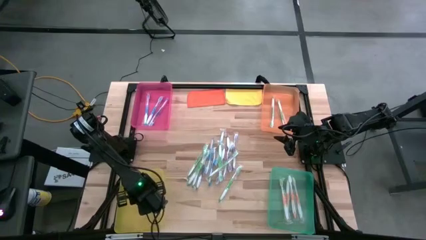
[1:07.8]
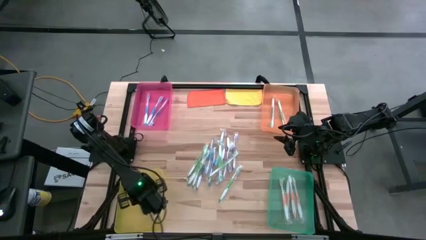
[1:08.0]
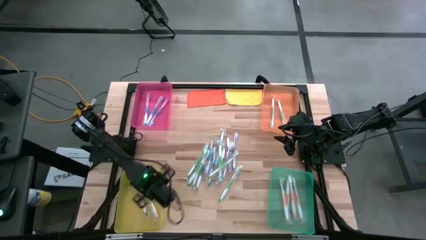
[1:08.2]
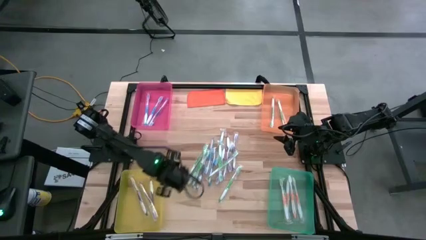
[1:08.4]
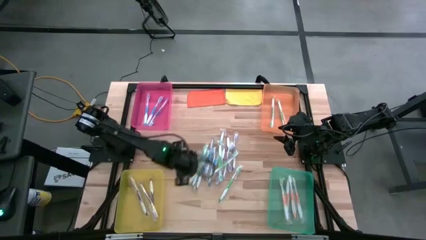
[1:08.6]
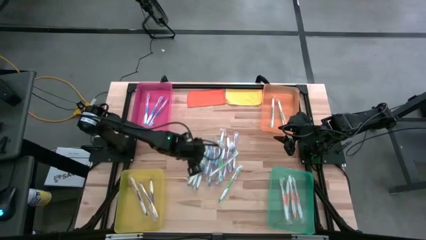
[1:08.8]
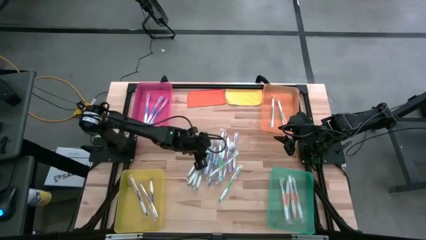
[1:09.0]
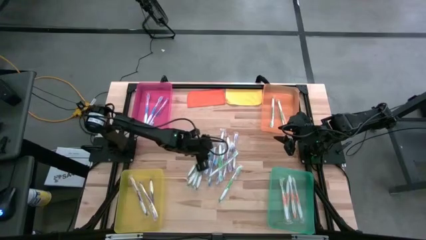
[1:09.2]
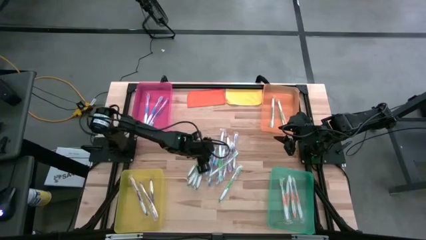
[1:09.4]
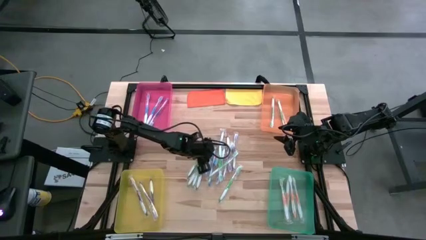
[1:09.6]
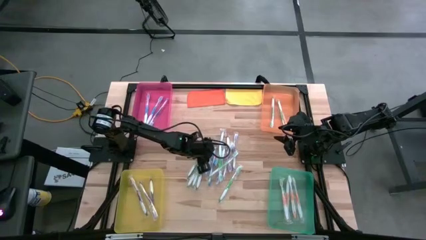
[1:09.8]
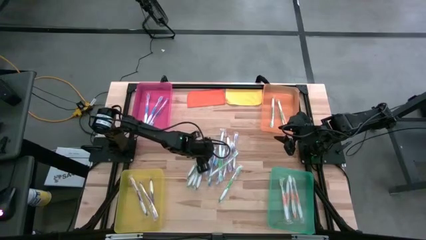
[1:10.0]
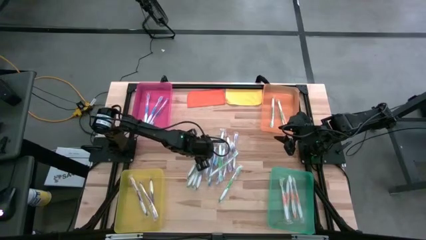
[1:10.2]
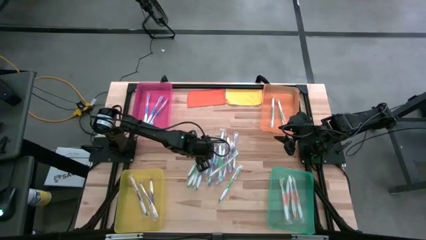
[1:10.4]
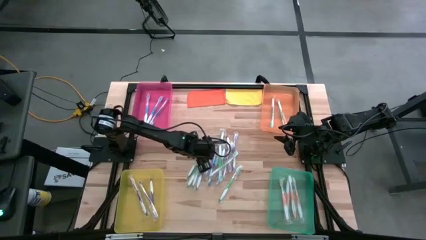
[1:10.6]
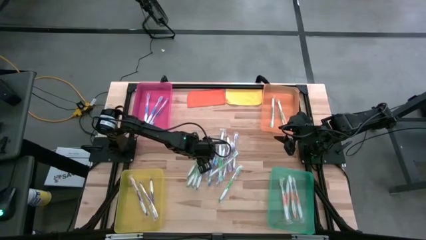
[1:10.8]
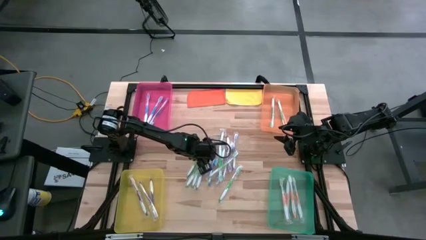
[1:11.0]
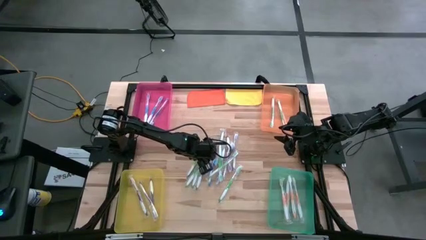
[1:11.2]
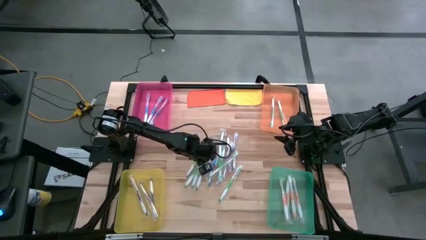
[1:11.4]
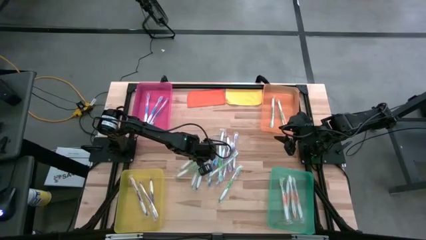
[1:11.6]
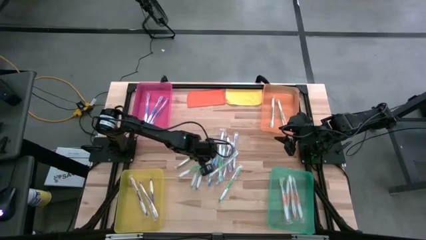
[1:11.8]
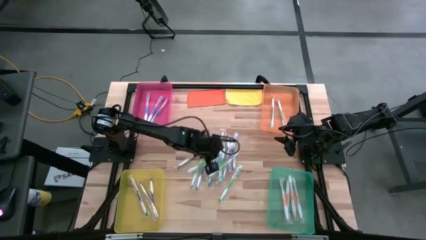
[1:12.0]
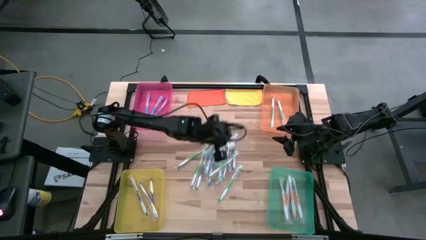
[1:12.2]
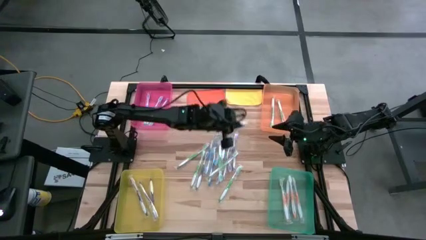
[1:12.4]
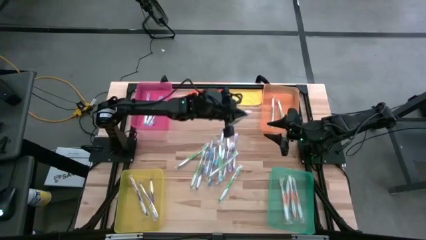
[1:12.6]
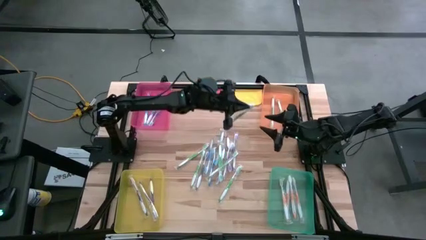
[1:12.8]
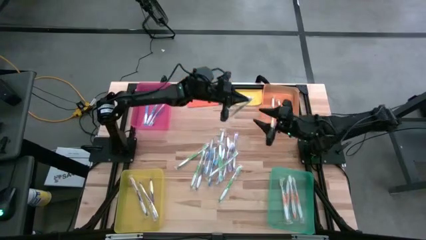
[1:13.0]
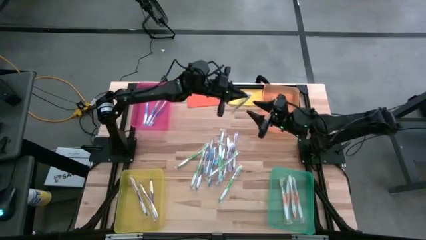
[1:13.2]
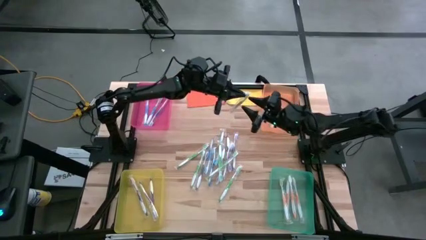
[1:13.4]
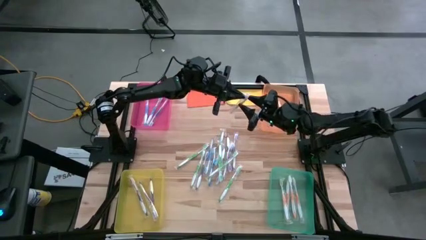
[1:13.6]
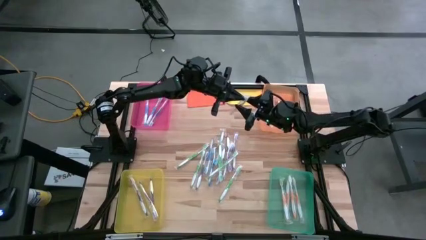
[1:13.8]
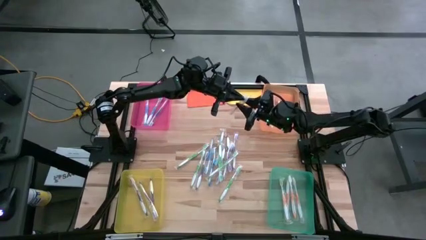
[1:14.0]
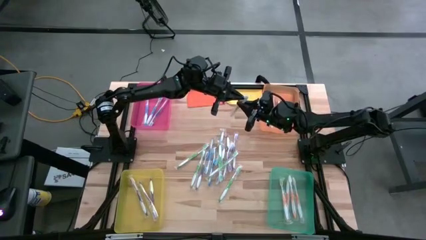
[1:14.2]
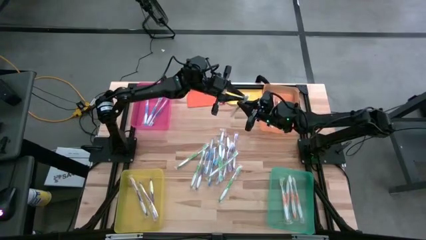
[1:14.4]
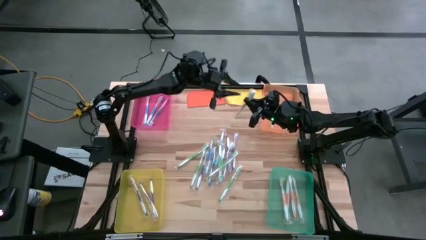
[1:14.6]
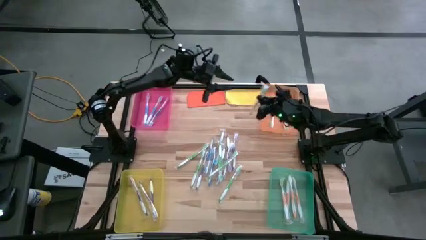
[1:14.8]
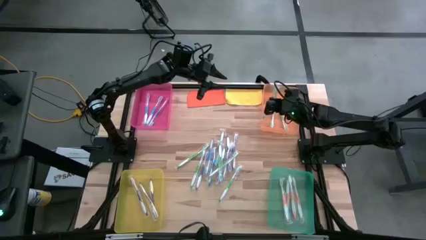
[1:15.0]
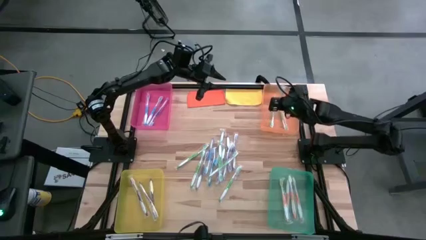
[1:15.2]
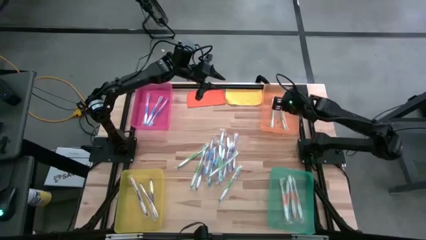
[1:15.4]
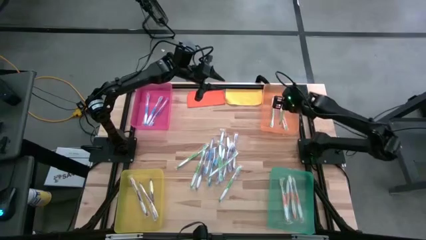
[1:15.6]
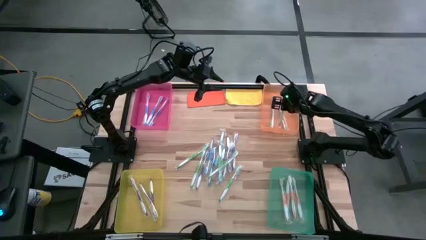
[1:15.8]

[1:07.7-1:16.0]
Task: Pick & Place Toothbrushes
Put the green toothbrush into the orange bin

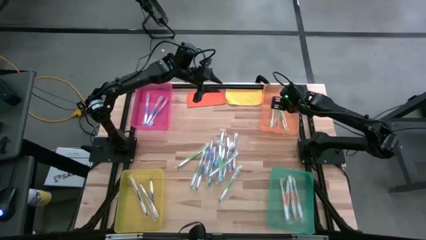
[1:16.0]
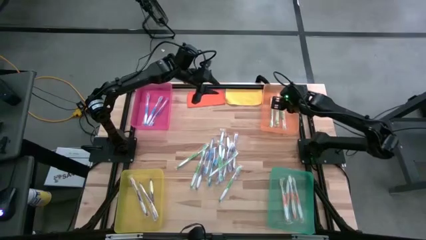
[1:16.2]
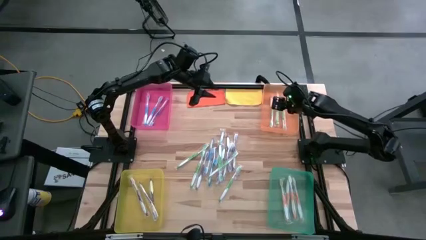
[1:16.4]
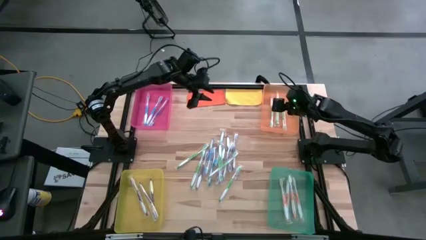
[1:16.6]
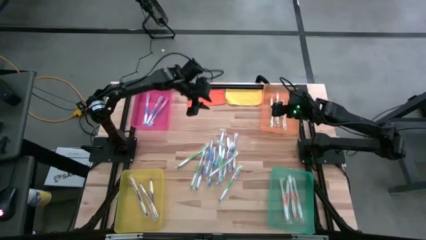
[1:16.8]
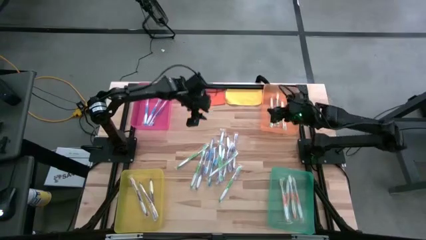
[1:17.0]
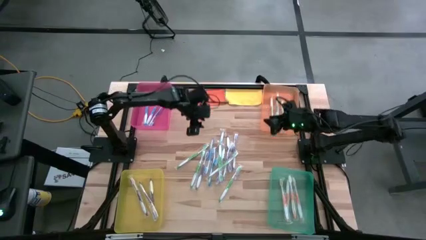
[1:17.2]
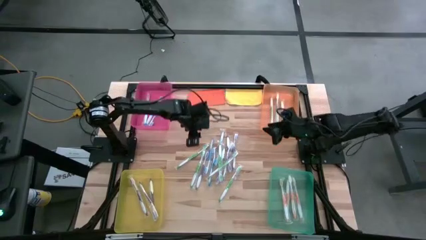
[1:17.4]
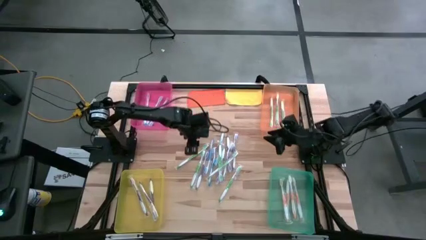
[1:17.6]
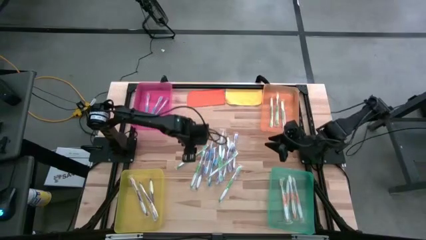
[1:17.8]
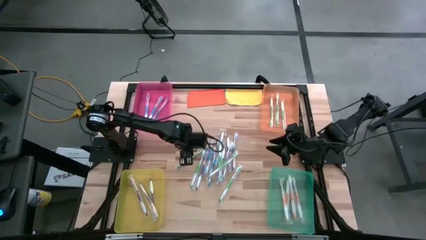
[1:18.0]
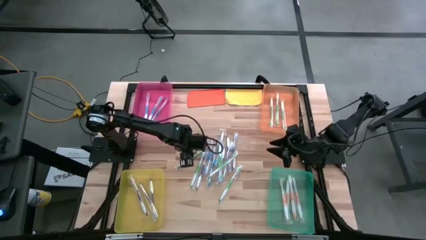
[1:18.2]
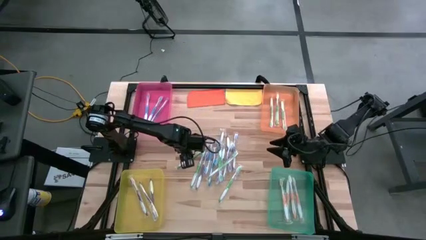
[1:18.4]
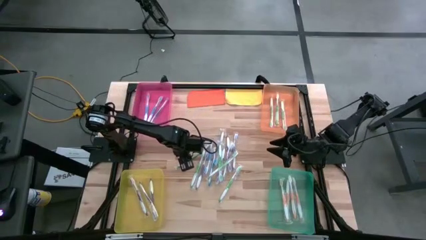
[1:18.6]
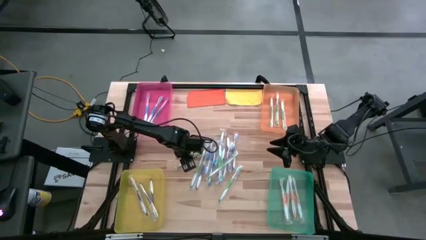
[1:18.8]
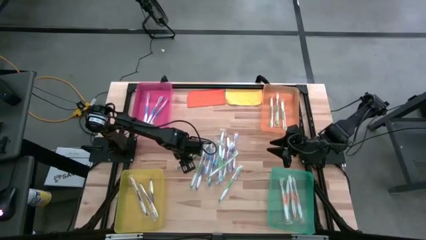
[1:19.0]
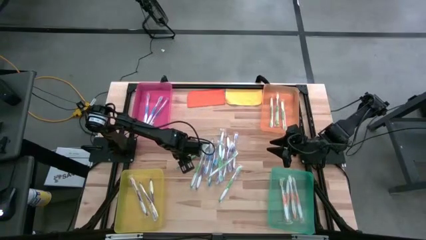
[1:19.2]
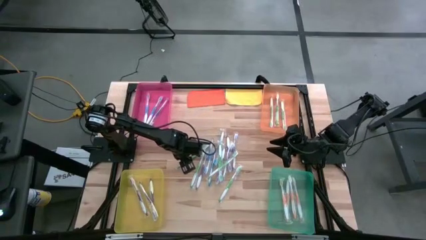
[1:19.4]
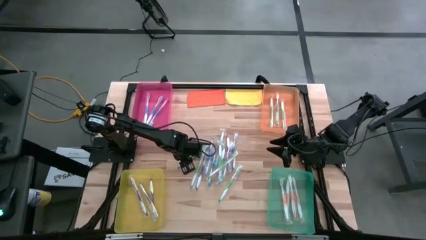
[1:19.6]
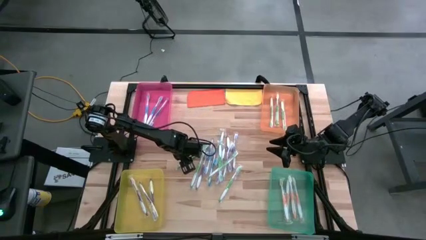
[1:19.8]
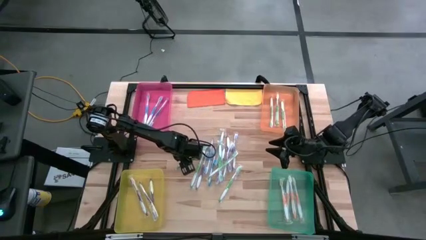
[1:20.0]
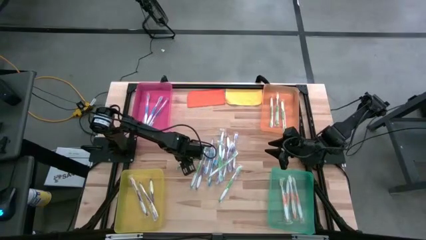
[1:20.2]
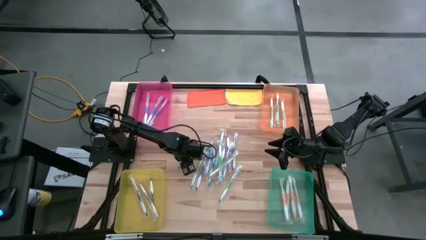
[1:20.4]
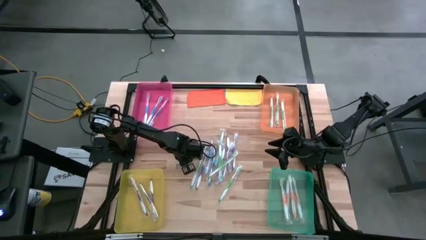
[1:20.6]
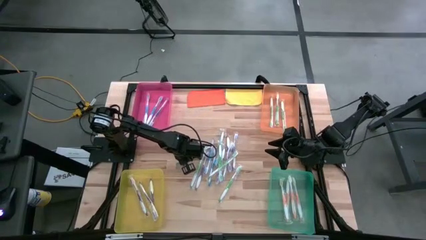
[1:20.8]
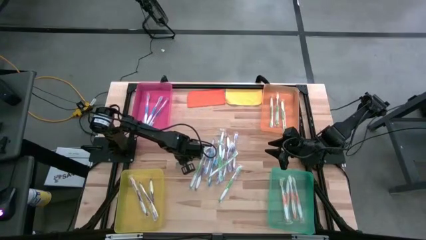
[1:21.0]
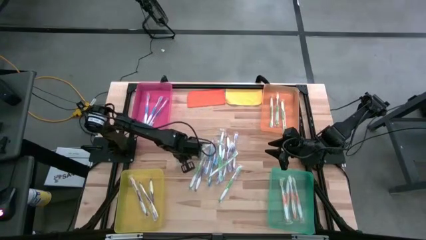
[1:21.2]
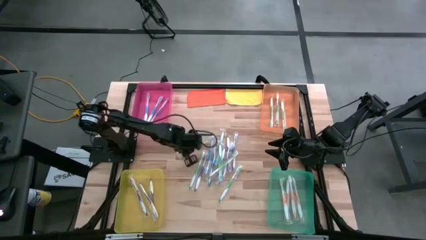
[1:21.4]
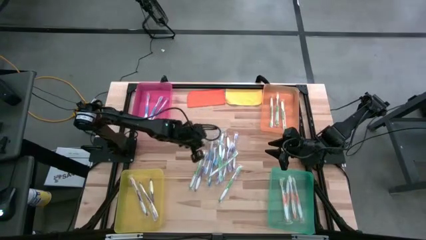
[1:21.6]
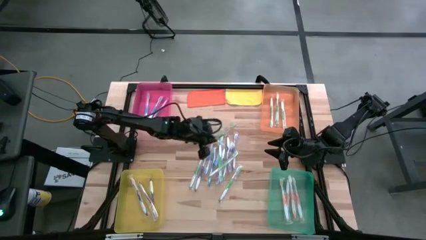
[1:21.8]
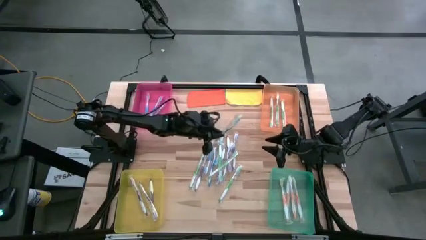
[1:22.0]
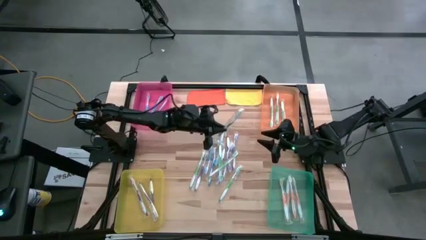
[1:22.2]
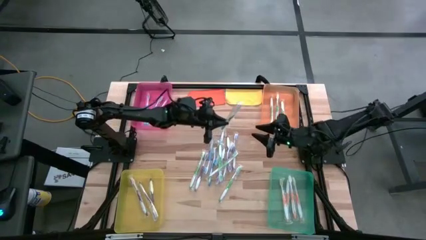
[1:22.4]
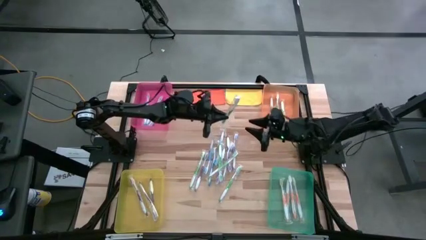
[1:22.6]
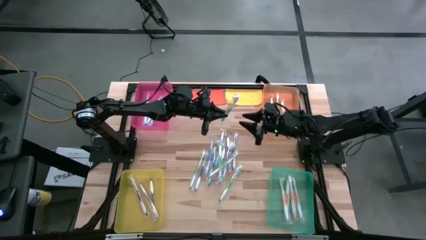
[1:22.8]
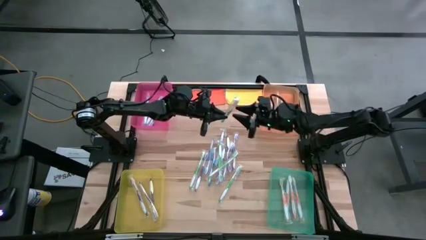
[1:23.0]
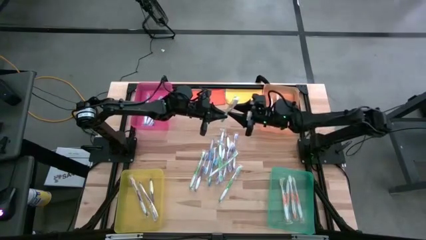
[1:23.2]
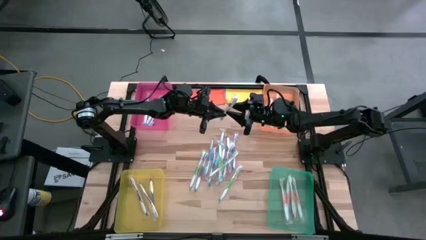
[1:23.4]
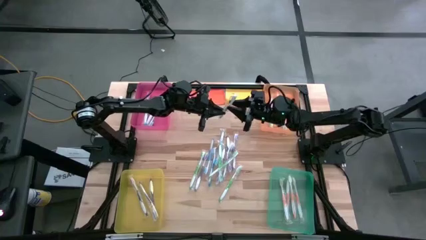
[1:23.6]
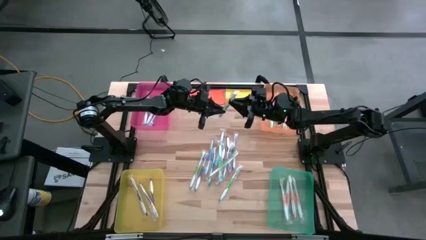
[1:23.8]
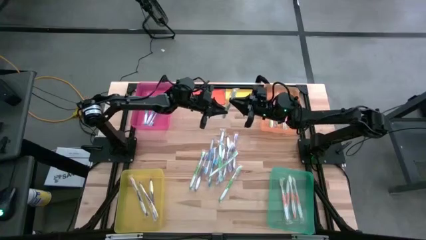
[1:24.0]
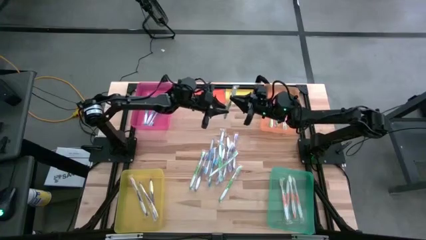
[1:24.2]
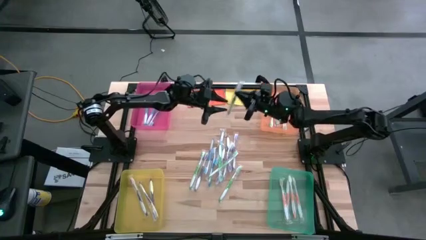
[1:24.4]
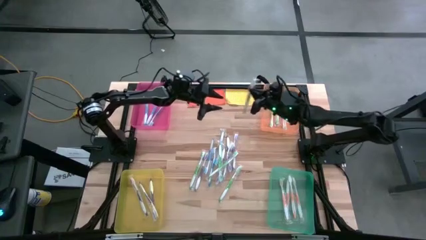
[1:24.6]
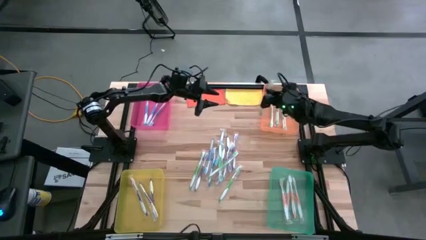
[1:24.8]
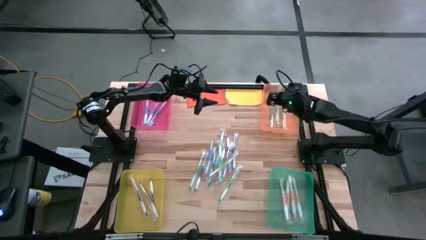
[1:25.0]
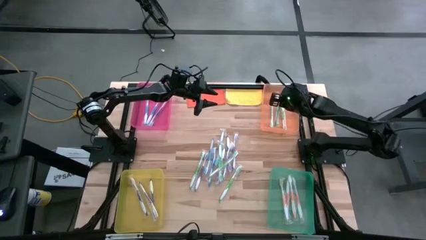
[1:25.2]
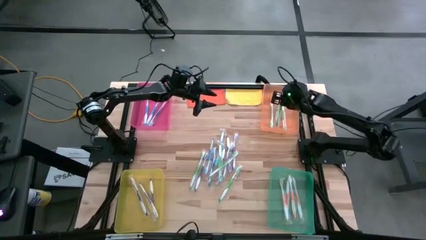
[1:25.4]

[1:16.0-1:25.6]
Put the green toothbrush into the orange bin

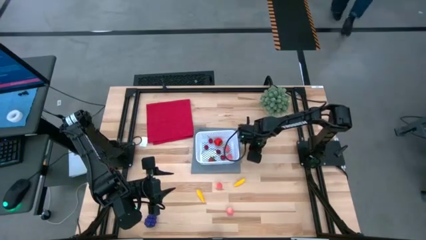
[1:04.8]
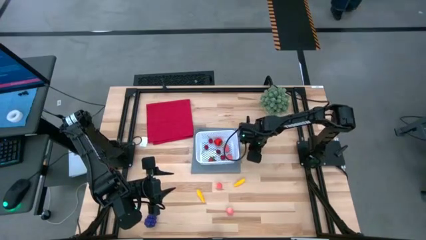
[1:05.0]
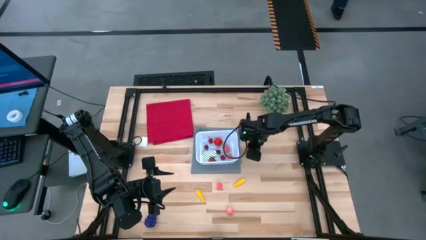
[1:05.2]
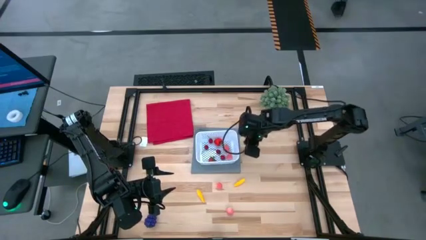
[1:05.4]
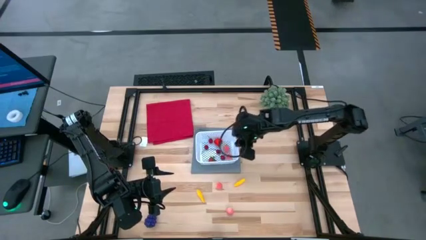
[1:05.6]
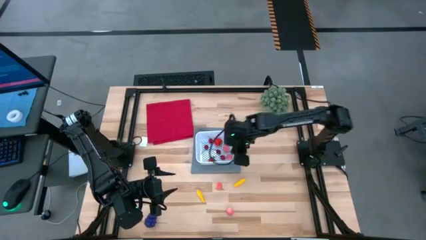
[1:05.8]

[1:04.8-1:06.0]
Task: Pick and placing Produce into tupperware
Put the black berry into the white basket
